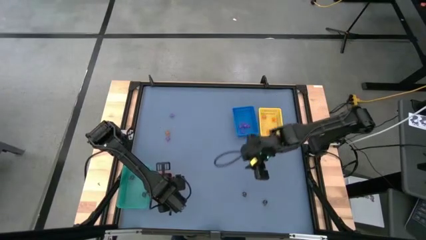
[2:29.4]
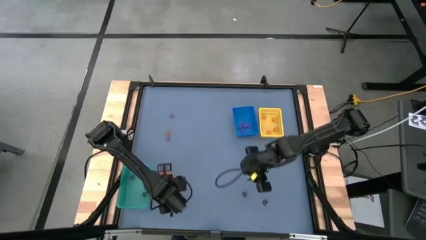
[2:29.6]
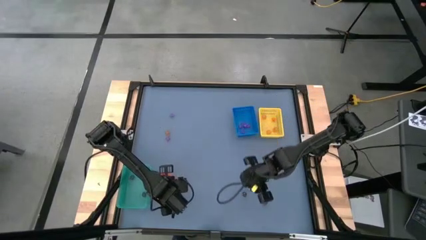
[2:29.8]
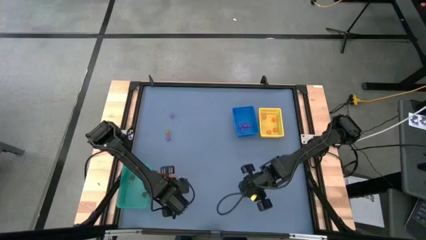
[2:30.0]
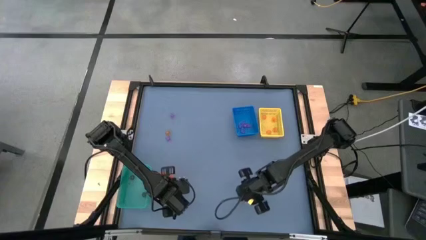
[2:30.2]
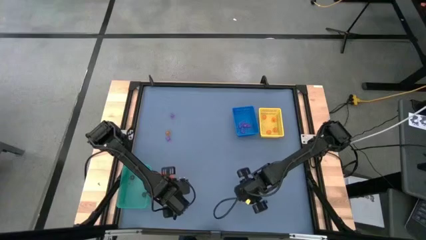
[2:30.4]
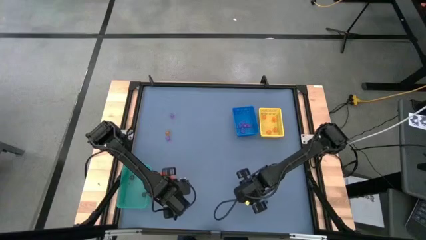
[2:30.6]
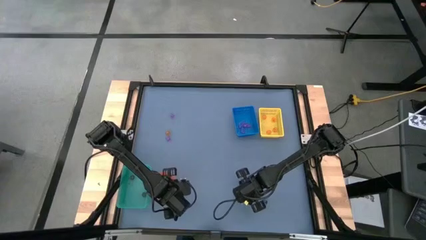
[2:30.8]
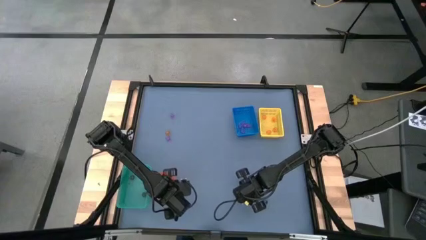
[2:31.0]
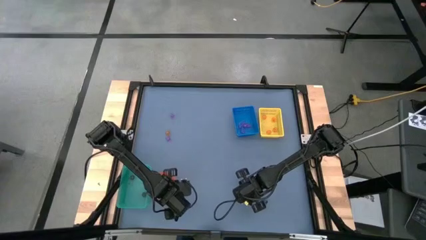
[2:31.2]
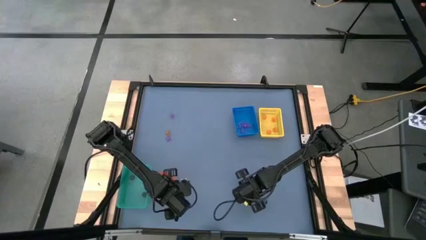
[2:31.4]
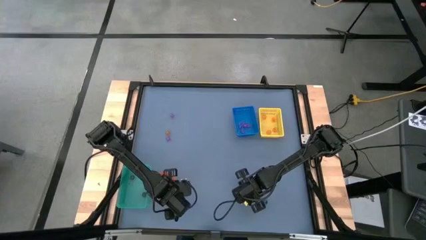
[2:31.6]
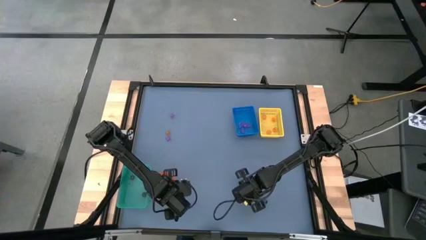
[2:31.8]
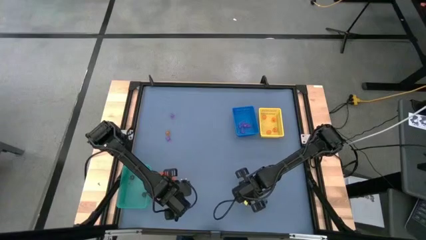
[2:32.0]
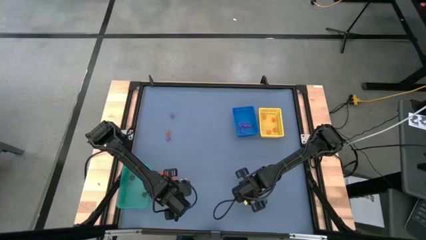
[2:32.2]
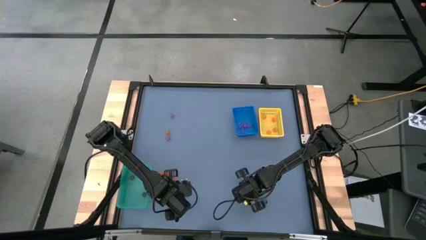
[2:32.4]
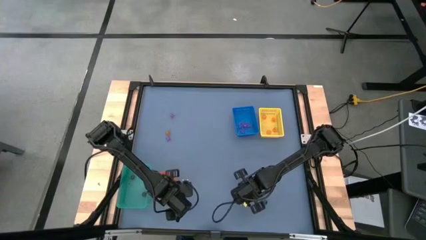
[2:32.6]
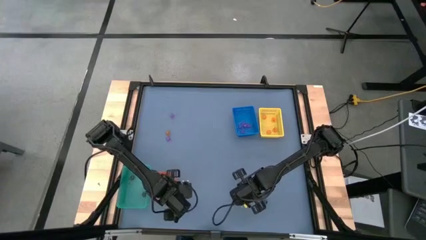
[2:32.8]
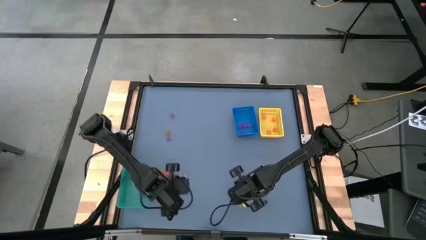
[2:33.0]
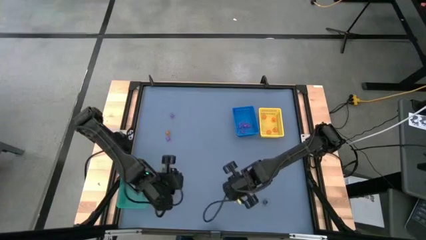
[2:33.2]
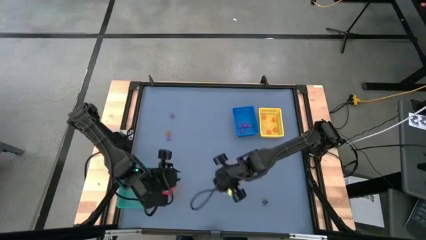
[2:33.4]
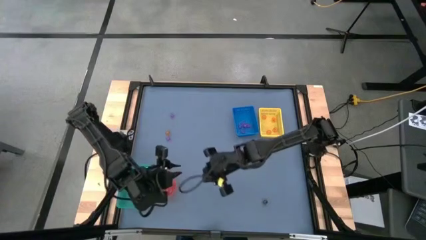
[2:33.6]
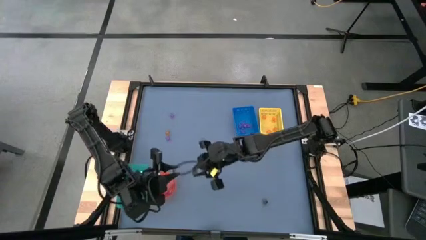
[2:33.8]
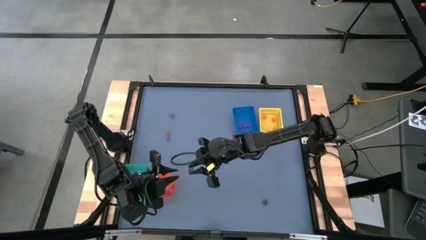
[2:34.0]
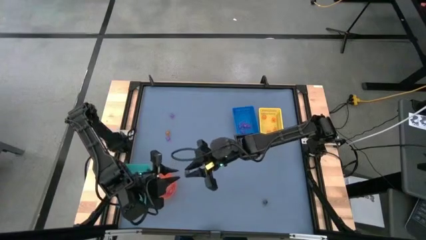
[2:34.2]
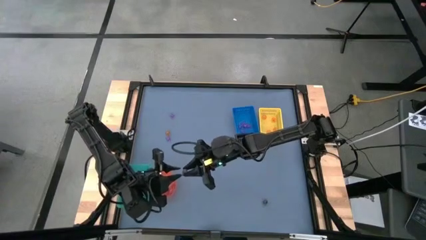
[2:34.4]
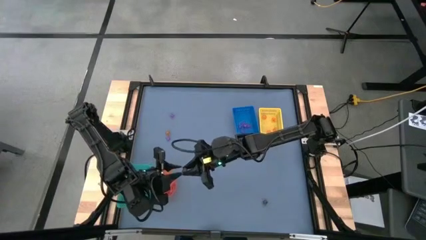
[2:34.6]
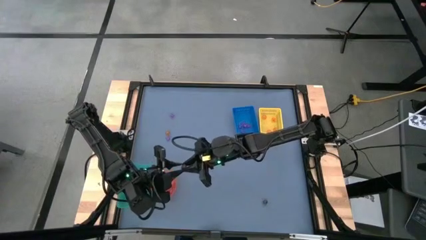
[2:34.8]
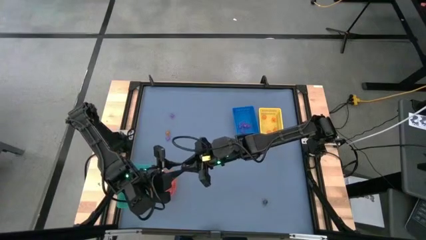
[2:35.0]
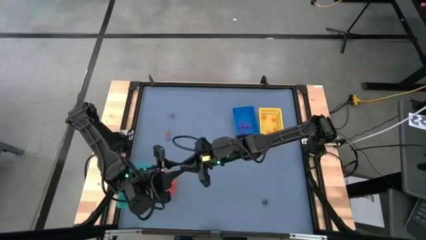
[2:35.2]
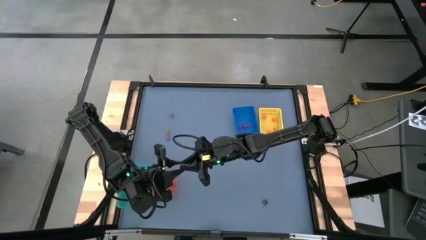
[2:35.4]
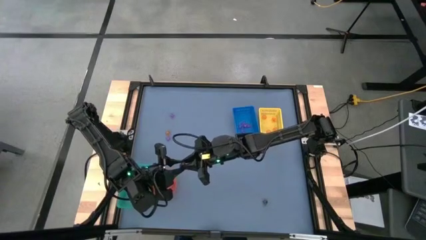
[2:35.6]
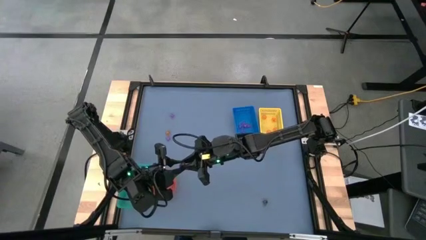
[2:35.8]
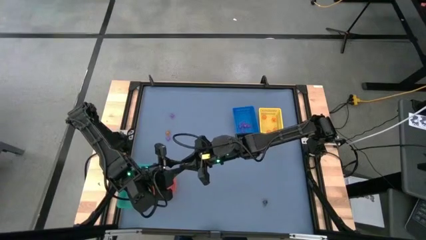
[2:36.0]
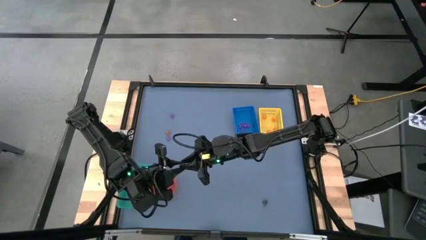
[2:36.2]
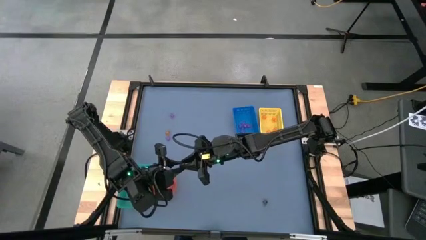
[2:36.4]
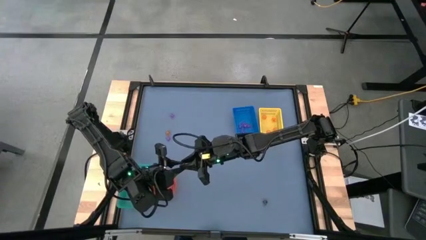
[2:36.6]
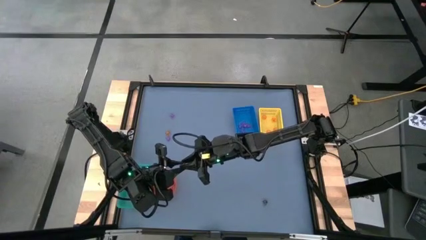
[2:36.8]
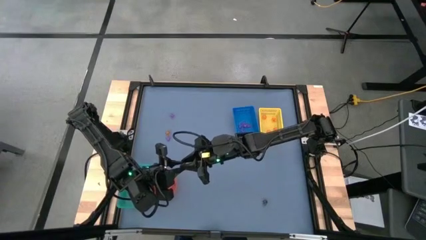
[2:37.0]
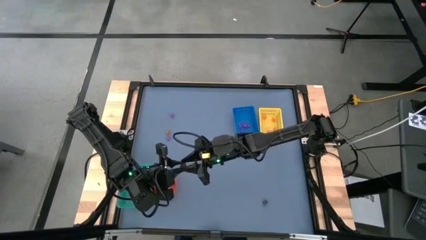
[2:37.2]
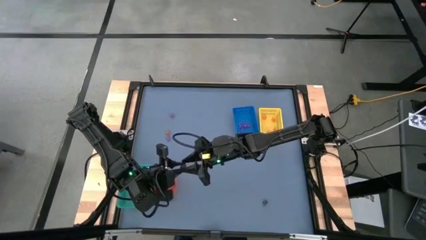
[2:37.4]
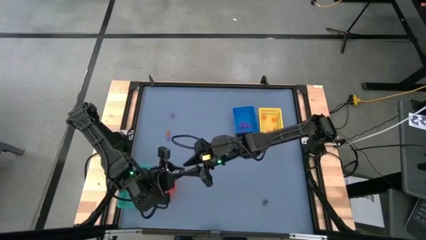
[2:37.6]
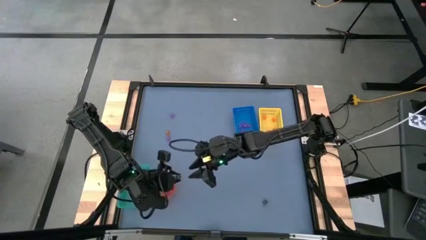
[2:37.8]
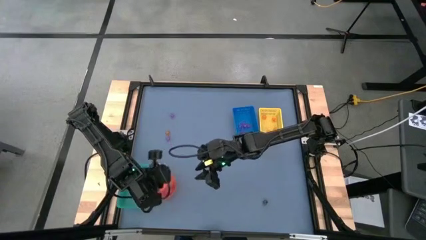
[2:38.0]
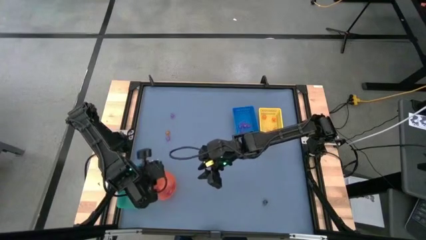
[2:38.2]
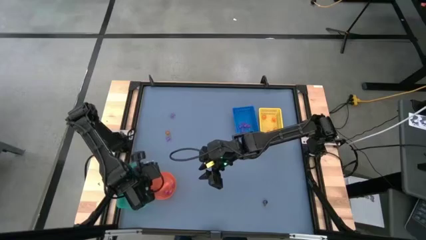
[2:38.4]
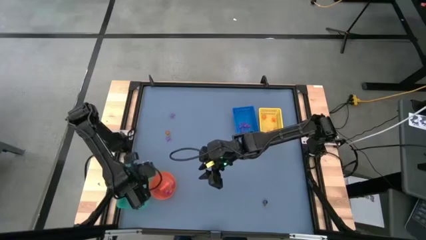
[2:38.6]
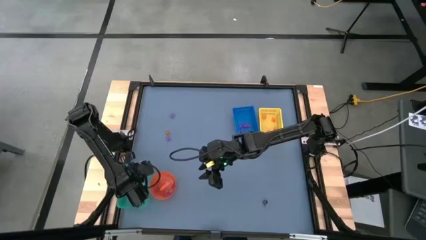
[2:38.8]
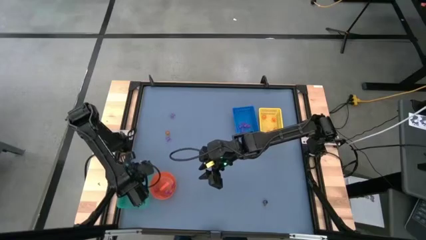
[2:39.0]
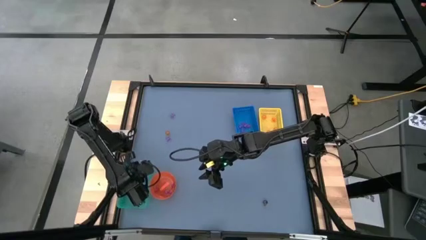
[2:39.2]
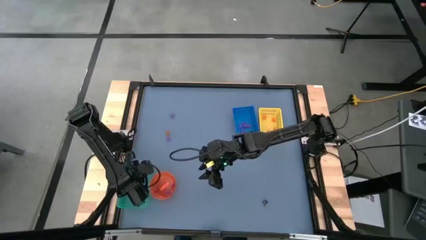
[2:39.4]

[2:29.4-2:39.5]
Task: Sort Halloween decoration
Put the brown skull toy into the light blue bin

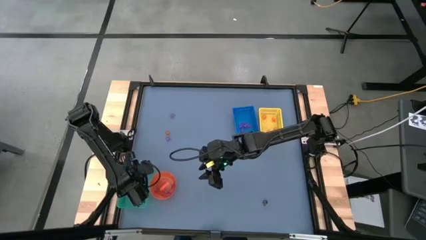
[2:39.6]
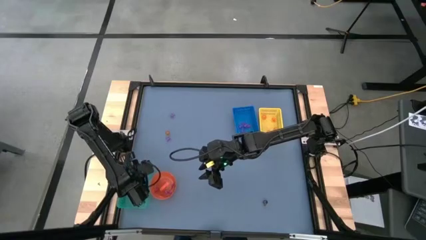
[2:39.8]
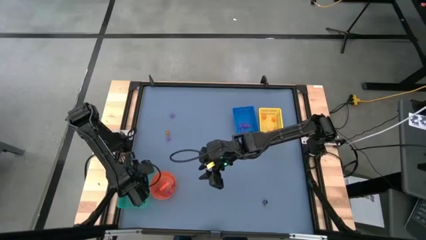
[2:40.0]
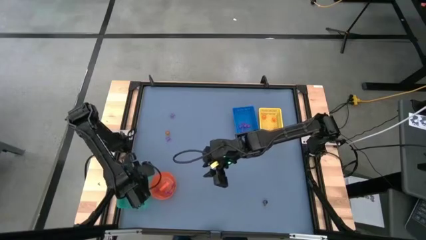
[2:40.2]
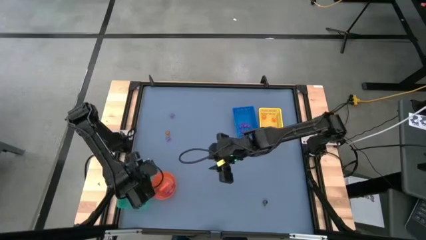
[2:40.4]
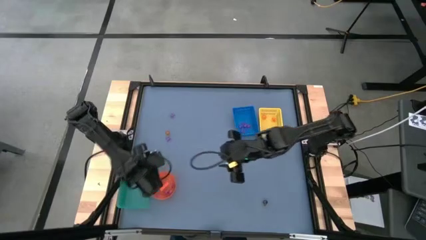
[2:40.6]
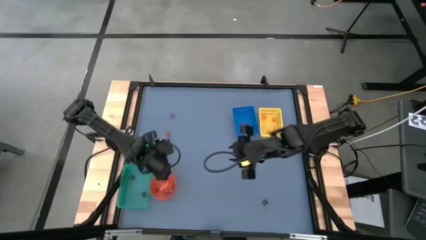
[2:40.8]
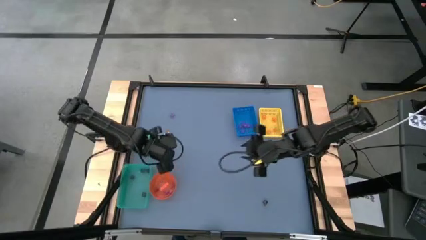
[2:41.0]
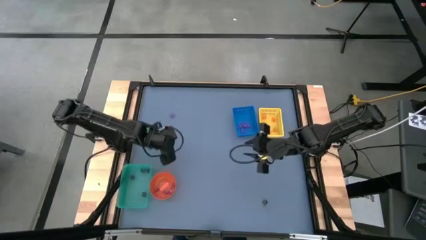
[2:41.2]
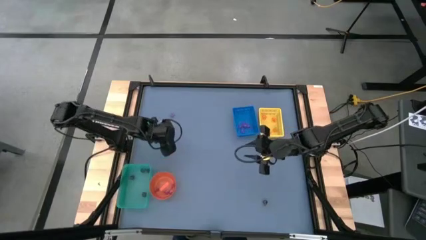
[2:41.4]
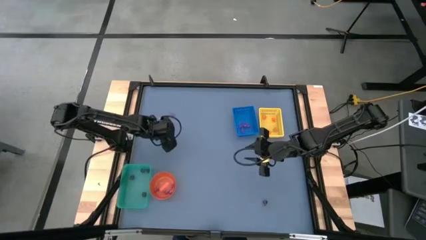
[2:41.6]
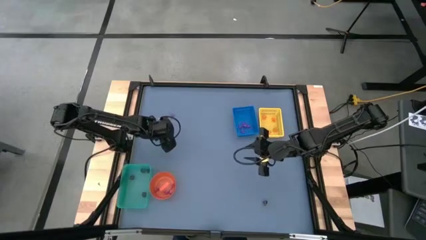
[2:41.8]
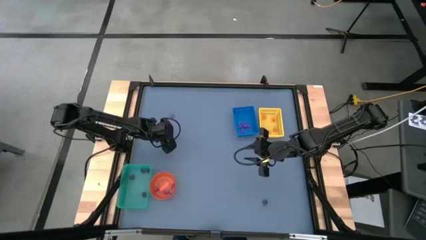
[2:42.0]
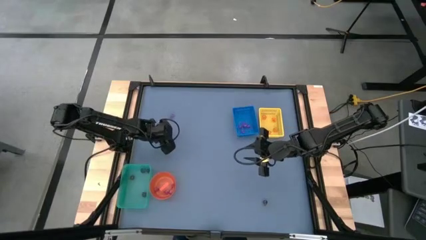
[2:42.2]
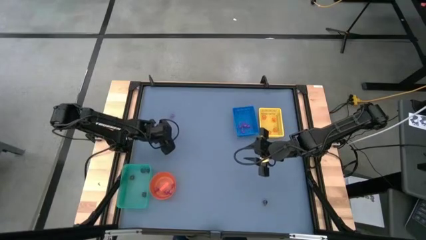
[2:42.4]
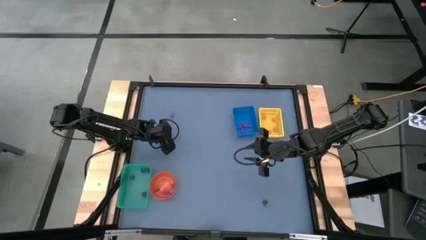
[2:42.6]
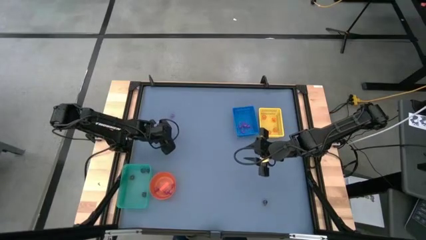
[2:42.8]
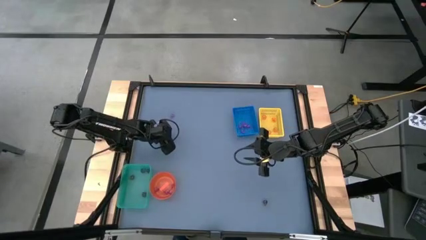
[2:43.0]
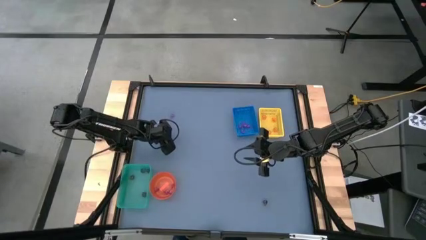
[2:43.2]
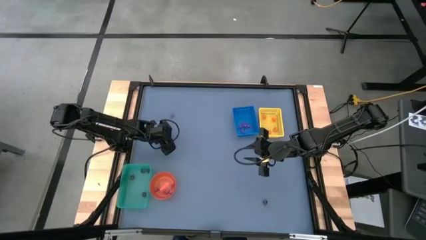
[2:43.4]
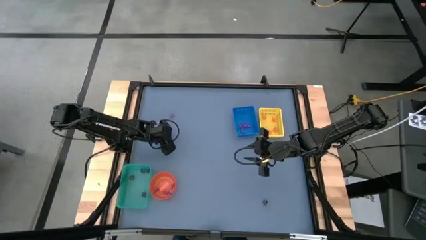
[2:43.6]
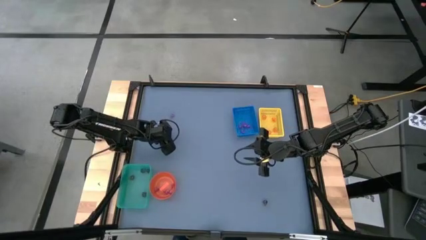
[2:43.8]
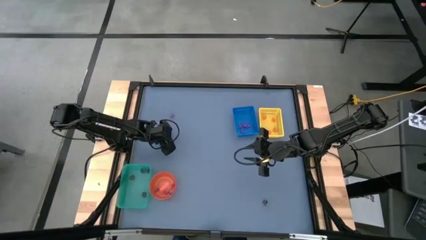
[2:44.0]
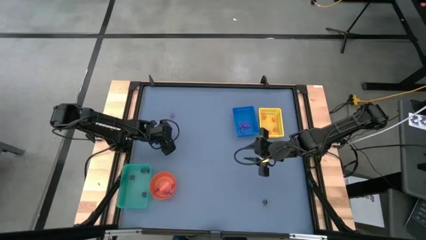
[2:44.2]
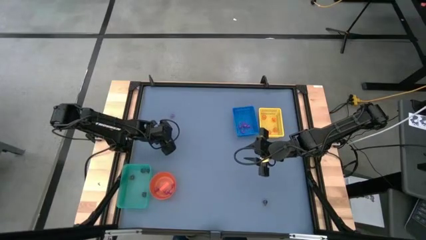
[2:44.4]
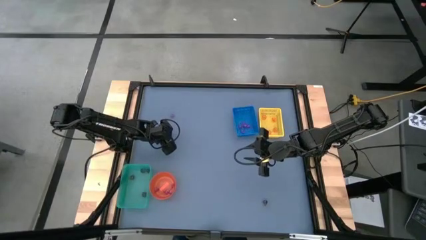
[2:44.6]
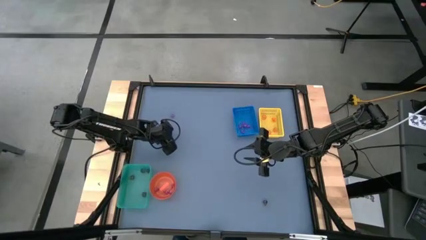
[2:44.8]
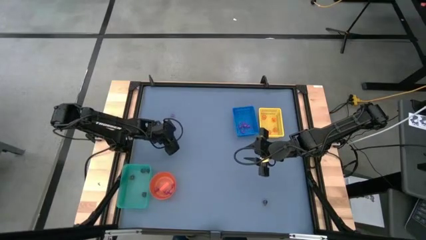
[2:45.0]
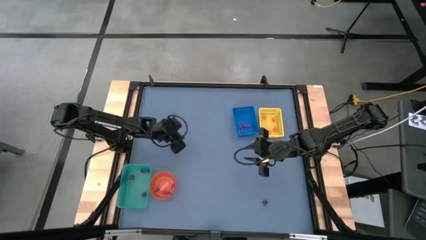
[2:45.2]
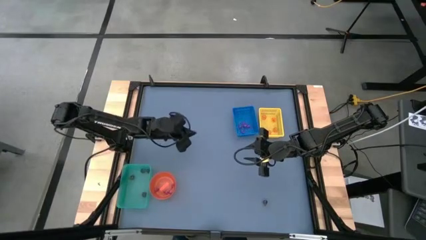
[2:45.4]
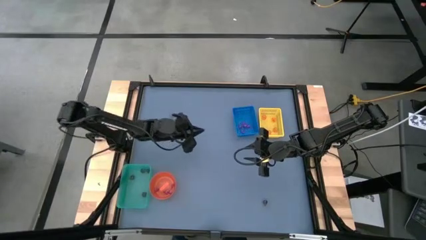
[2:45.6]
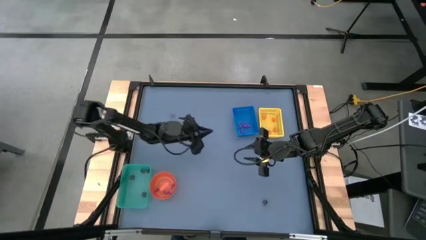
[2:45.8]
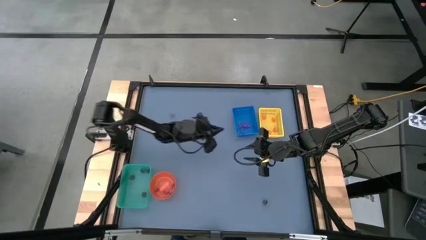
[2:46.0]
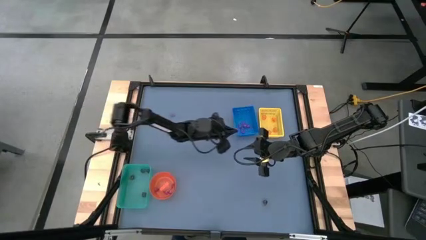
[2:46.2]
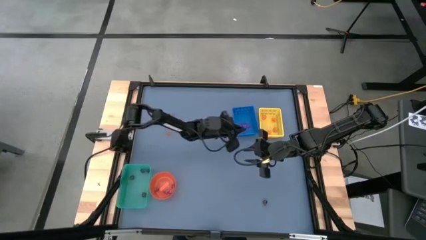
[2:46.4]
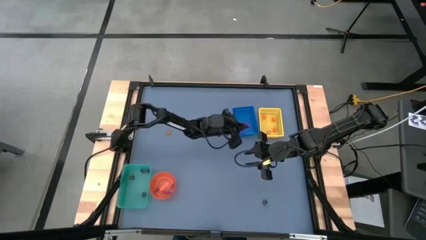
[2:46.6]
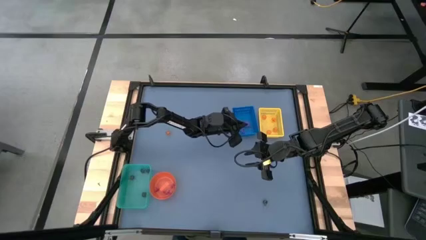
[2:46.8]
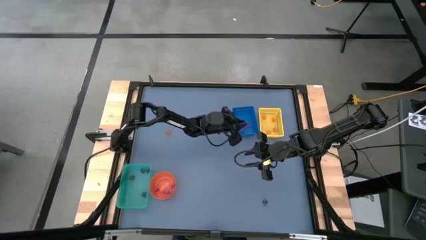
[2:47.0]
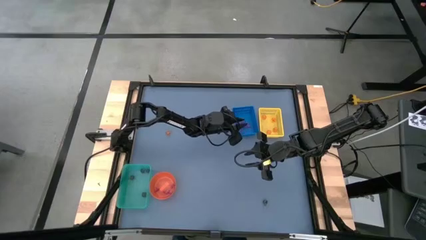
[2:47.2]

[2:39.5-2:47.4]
Put the violet spider toy into the blue box
